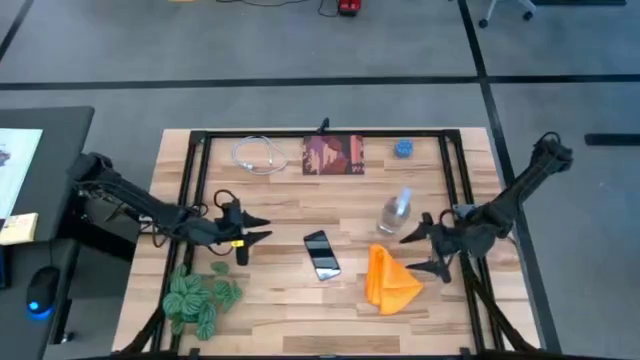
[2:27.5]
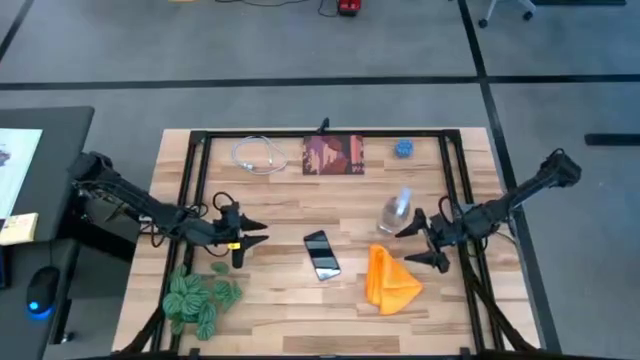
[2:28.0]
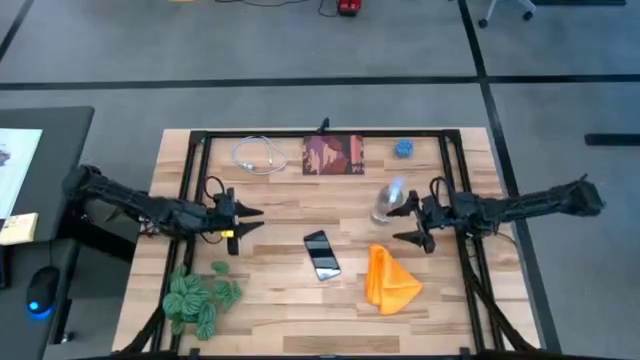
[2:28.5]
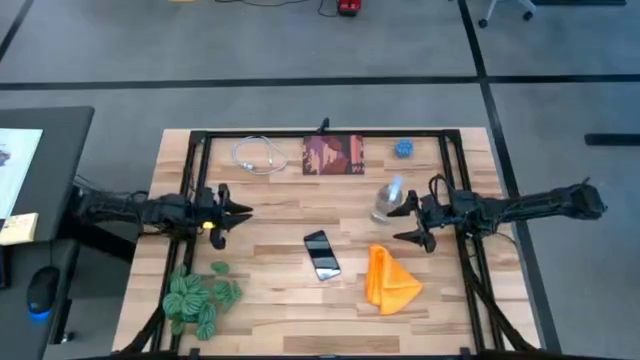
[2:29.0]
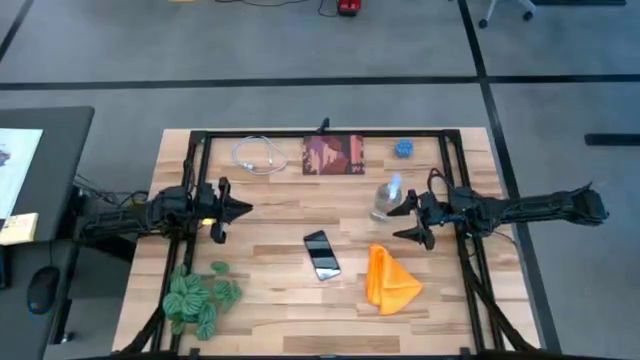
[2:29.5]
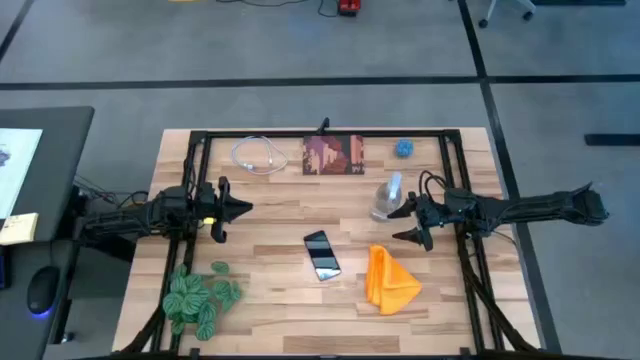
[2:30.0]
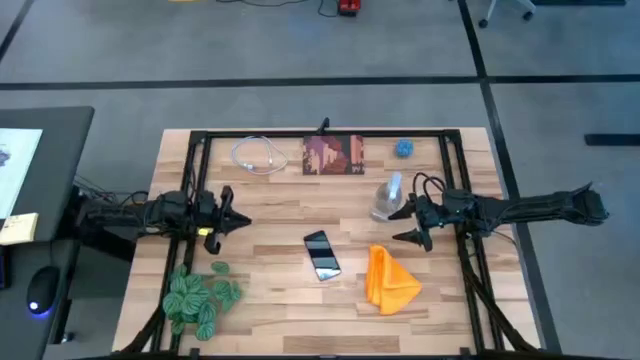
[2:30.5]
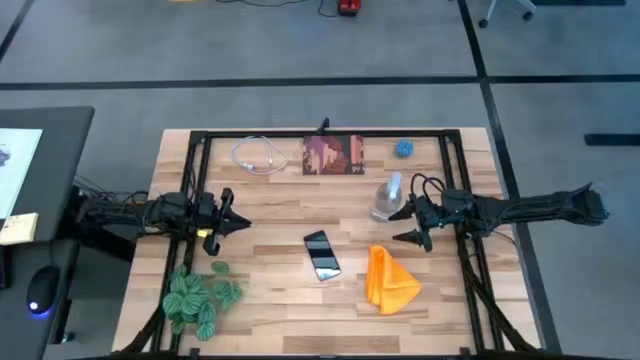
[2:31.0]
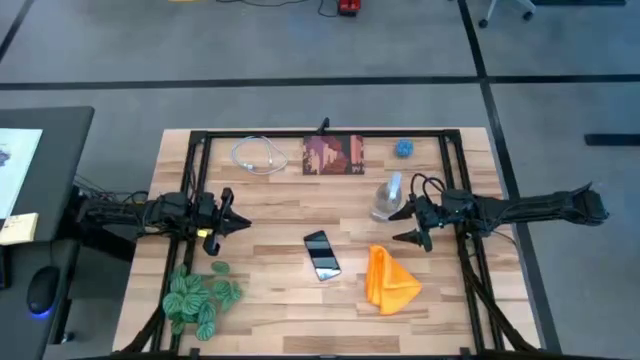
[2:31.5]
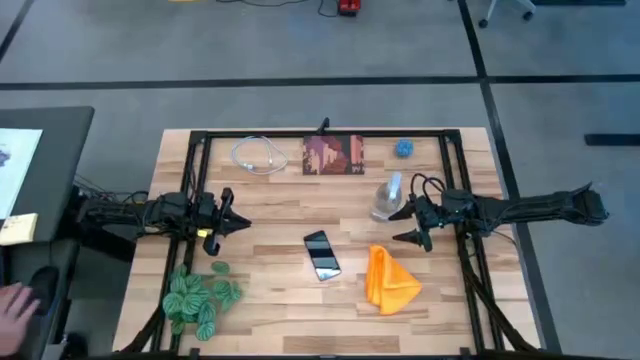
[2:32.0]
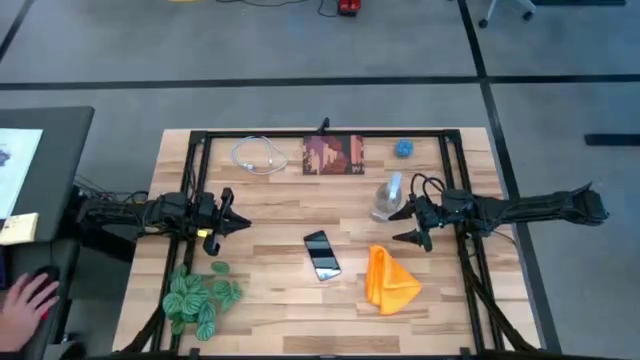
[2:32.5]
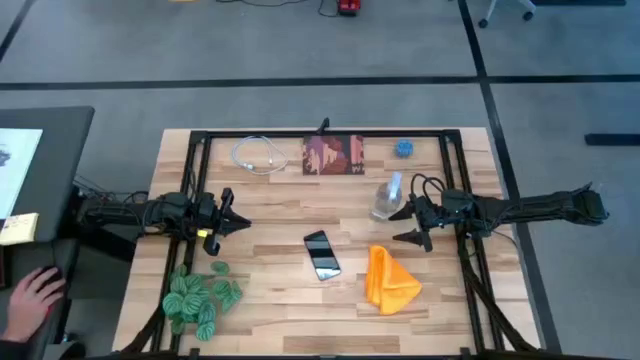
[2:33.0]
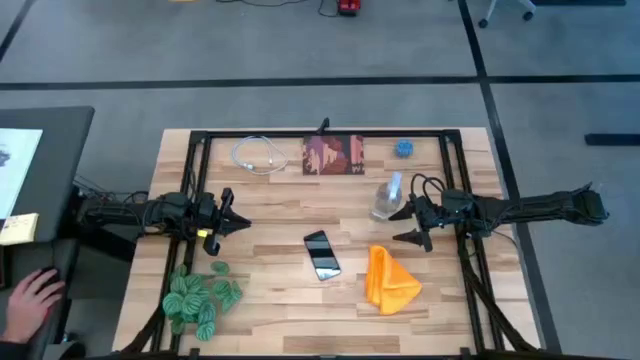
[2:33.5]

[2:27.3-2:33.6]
Task: Apply microfiber cloth
Return to Home Position

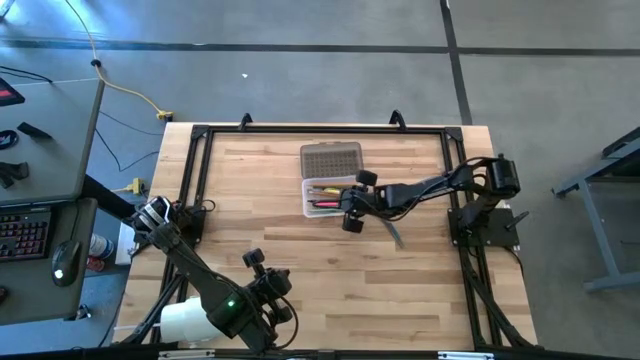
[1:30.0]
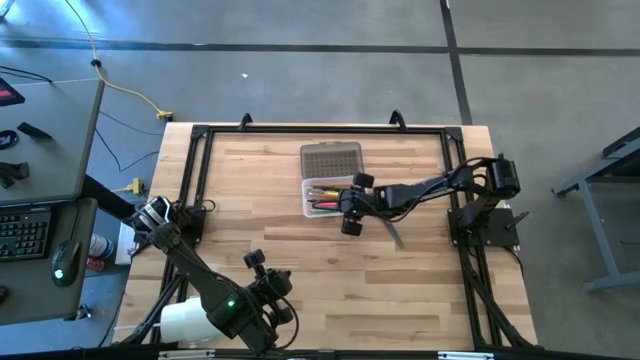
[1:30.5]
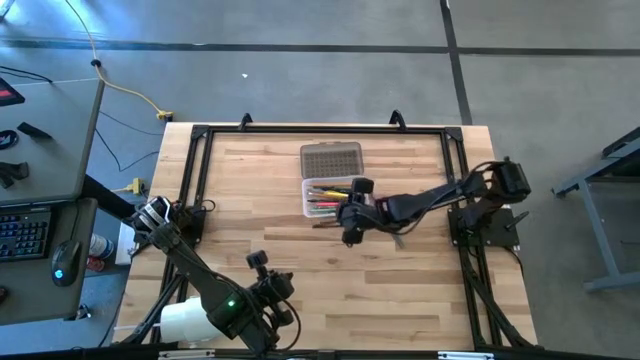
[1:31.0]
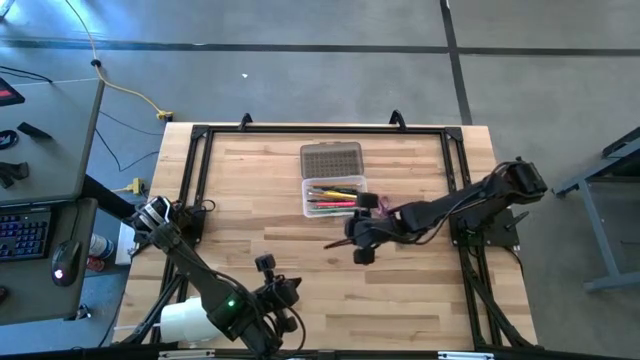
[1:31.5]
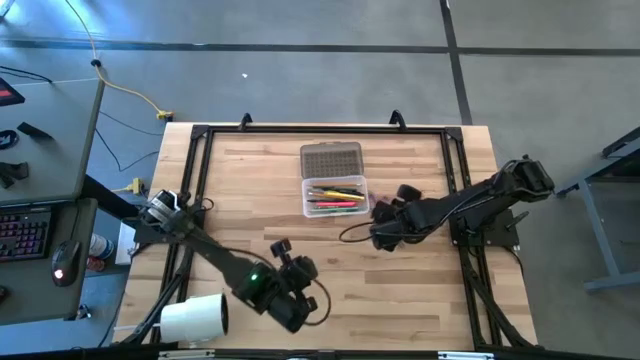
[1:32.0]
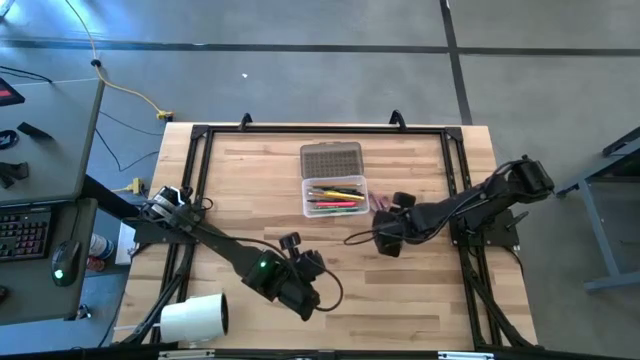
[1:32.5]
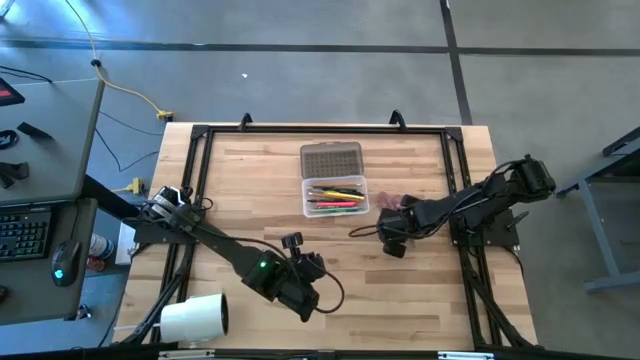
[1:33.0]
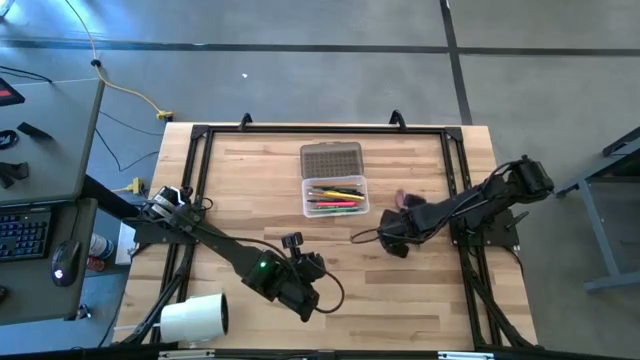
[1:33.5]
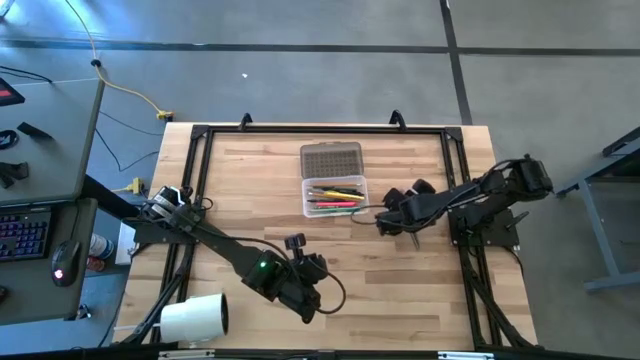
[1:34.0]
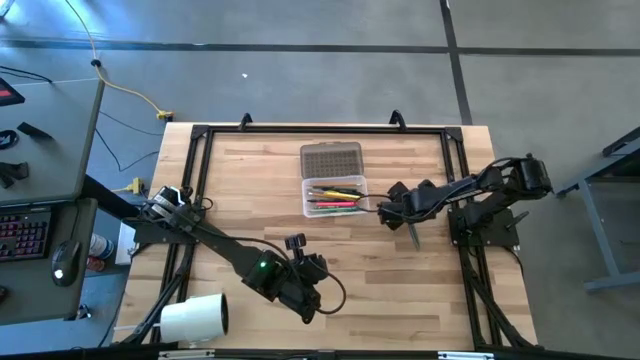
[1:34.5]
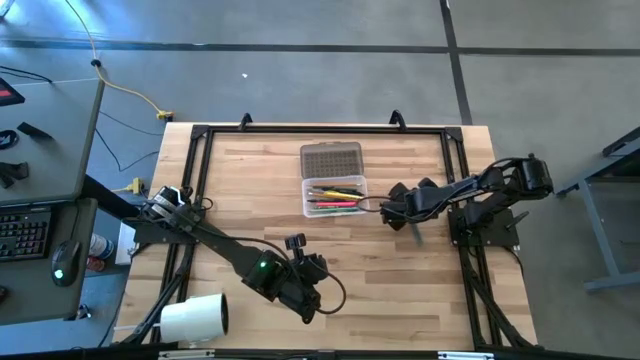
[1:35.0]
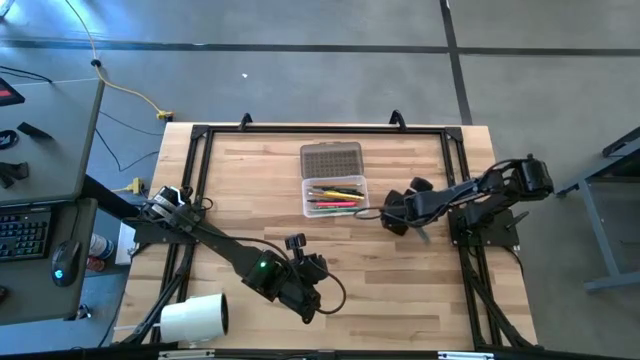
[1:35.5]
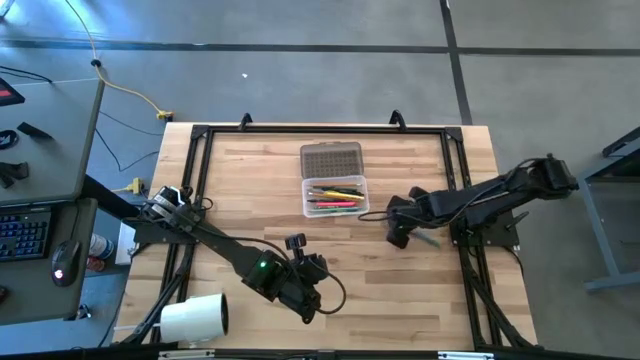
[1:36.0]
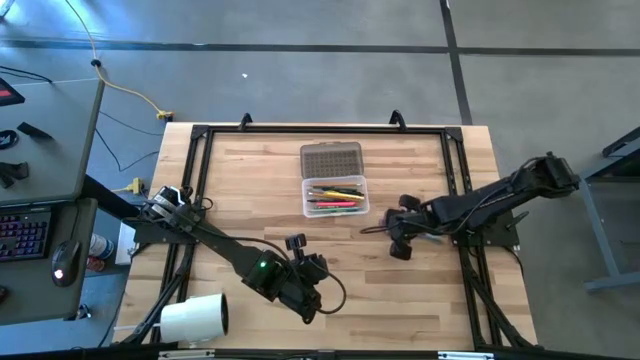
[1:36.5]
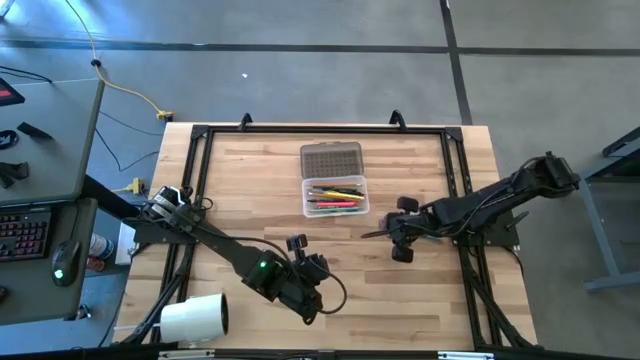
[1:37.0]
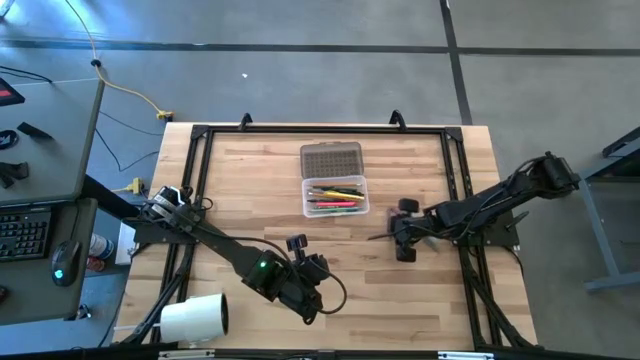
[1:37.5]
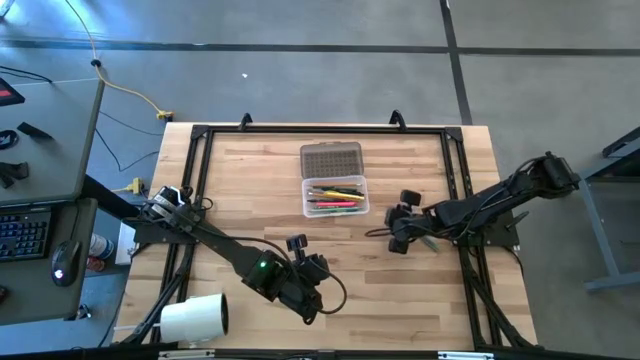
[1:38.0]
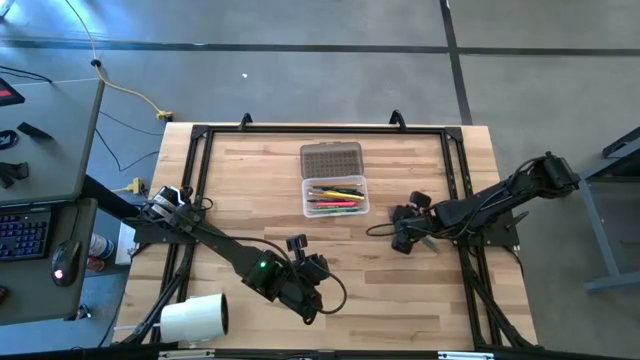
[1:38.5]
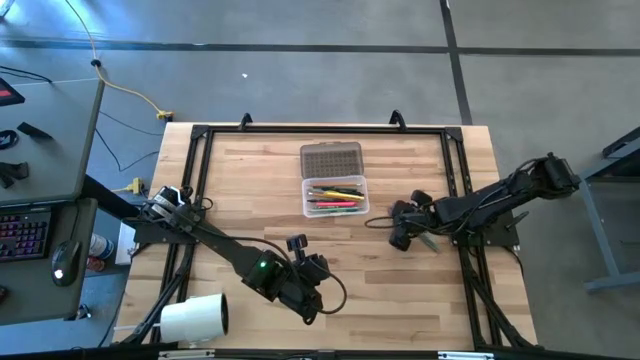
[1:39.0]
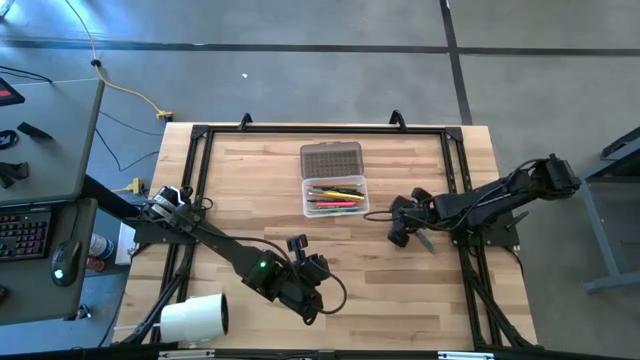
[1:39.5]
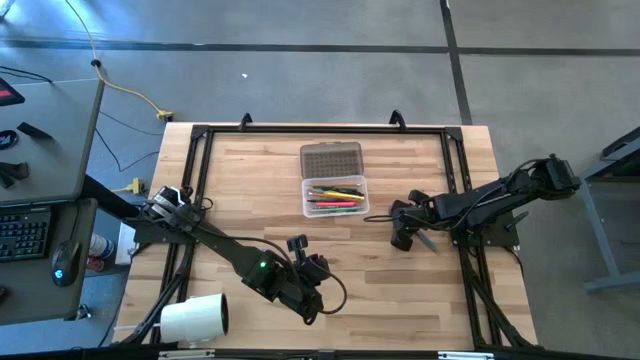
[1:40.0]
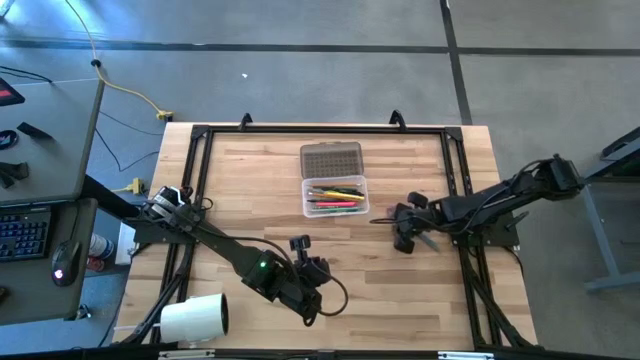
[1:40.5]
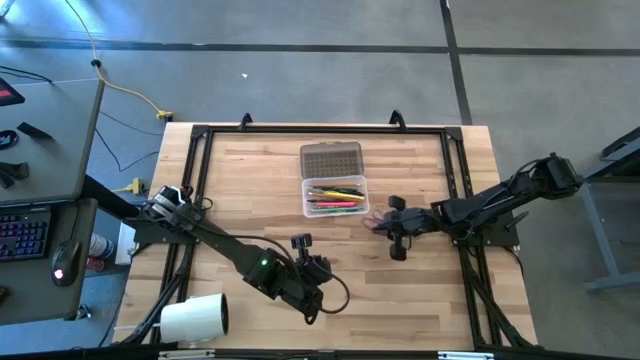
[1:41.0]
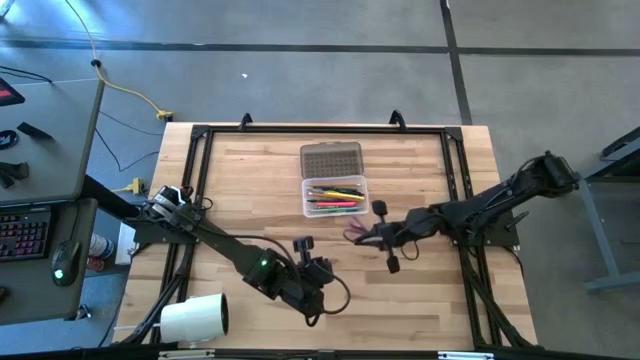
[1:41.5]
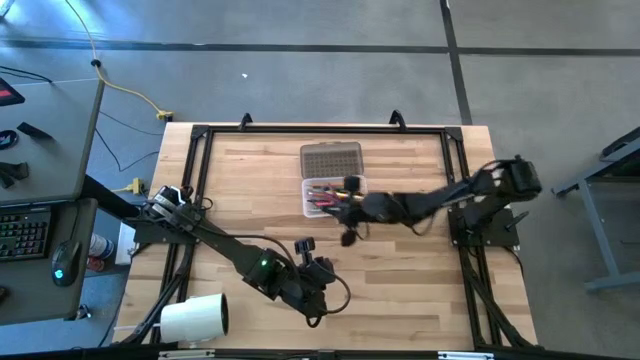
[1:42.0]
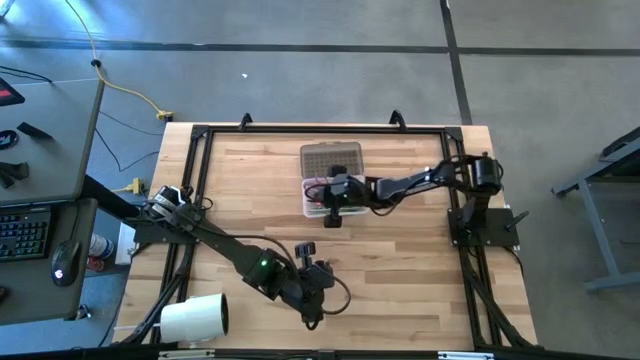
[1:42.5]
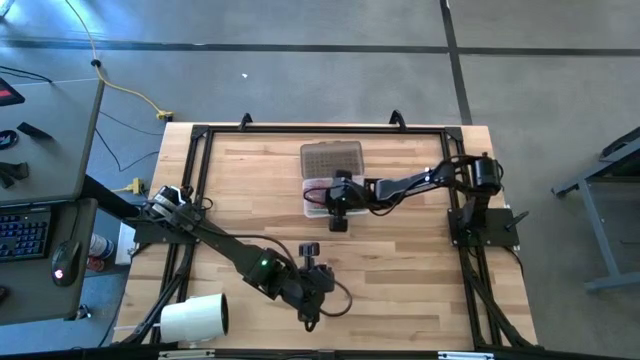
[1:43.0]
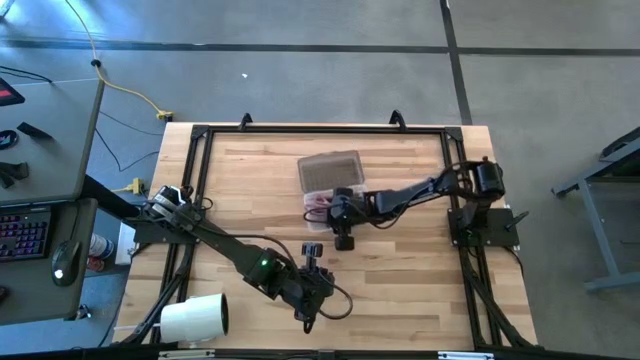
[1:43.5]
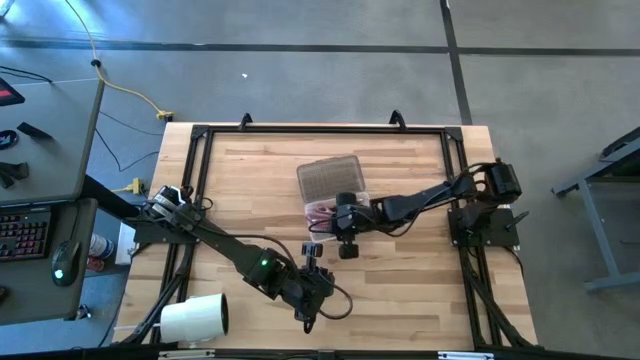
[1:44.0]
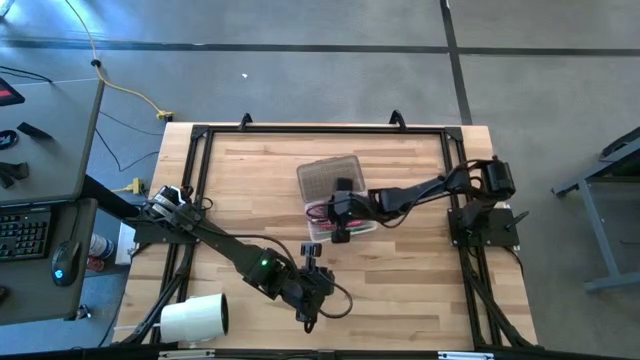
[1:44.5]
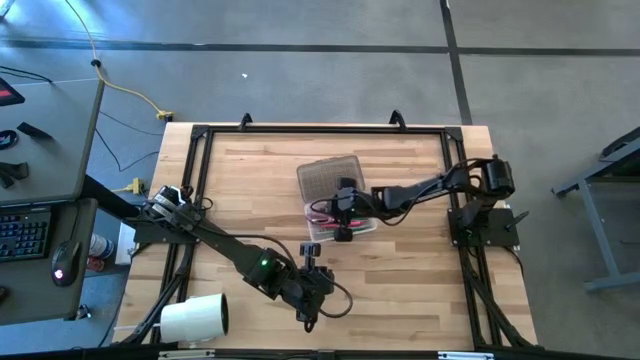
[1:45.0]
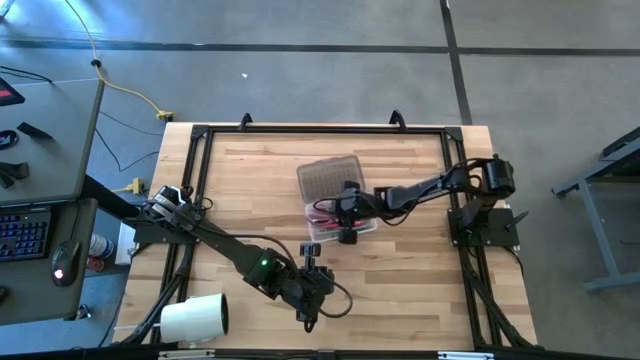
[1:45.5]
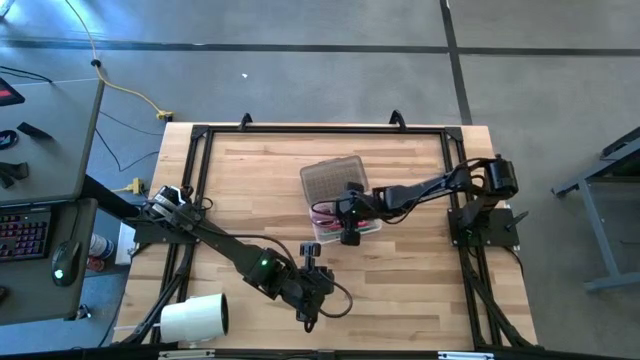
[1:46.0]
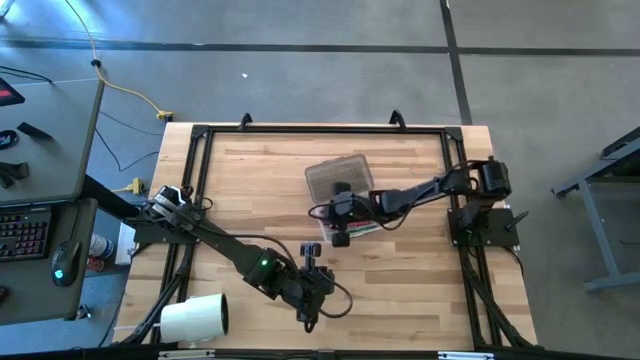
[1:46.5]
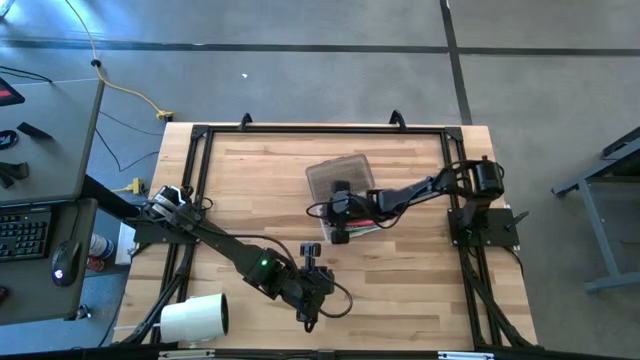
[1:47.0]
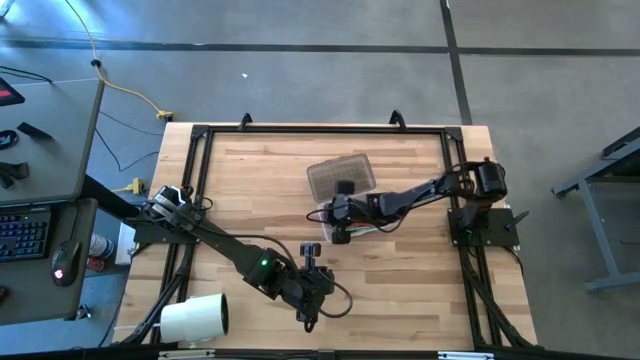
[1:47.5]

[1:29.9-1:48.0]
Task: Pick & place school supplies into a supply box
Put the violet scissors into the black supply box
